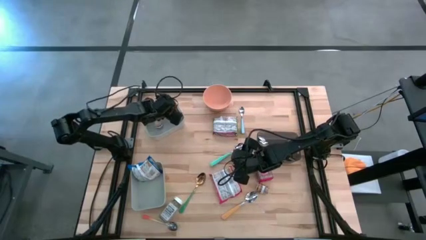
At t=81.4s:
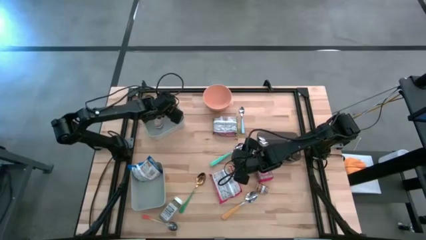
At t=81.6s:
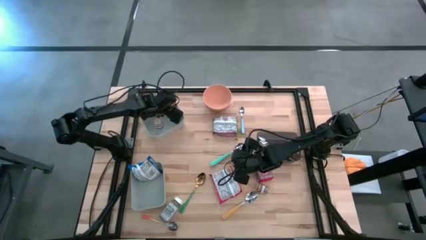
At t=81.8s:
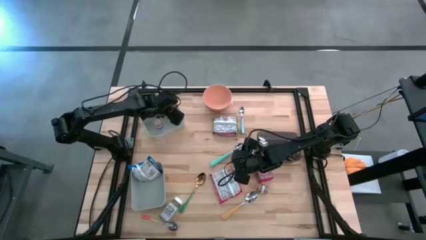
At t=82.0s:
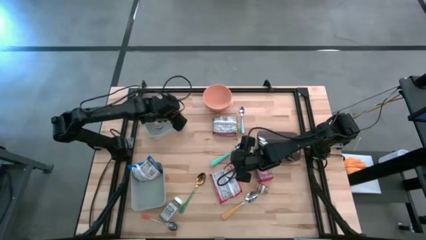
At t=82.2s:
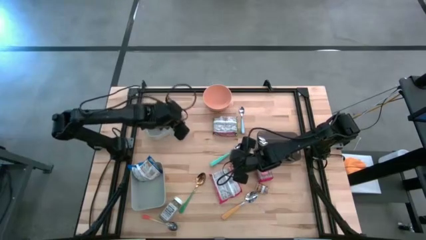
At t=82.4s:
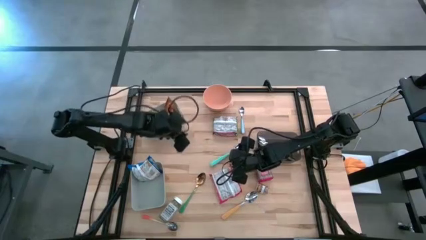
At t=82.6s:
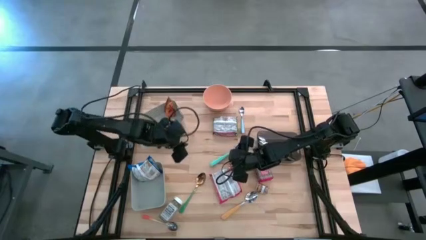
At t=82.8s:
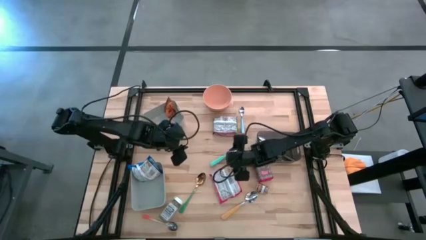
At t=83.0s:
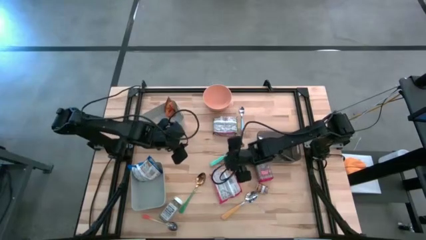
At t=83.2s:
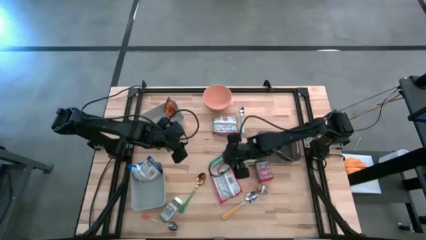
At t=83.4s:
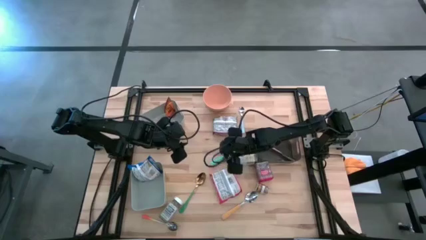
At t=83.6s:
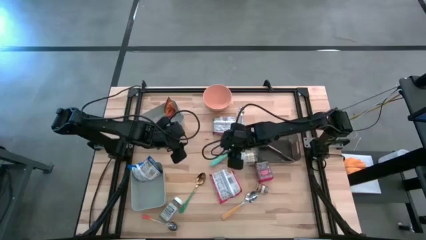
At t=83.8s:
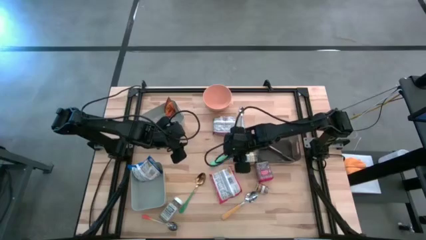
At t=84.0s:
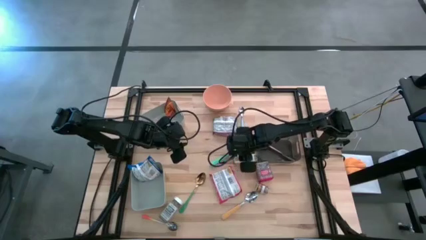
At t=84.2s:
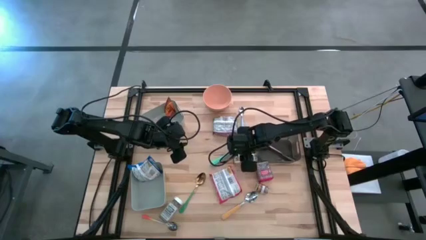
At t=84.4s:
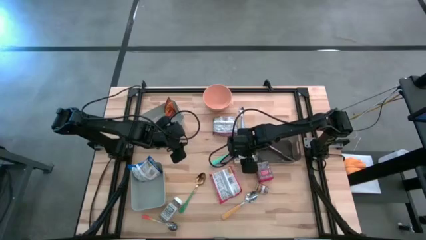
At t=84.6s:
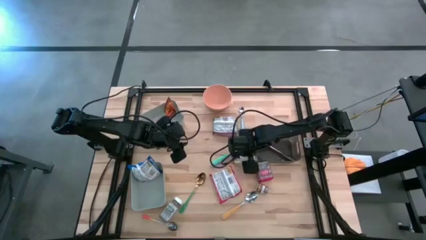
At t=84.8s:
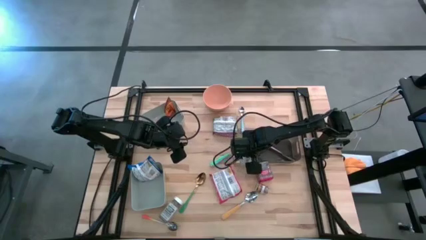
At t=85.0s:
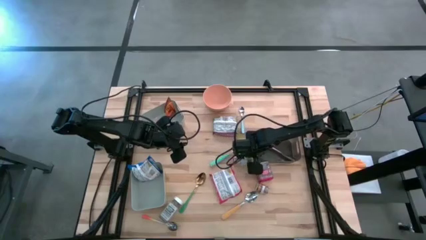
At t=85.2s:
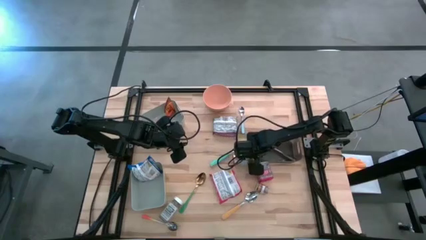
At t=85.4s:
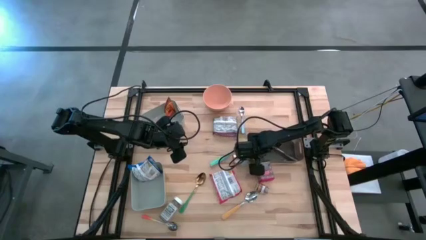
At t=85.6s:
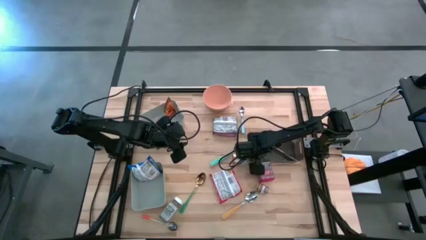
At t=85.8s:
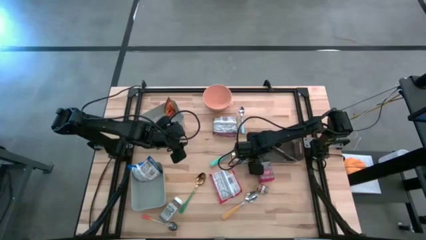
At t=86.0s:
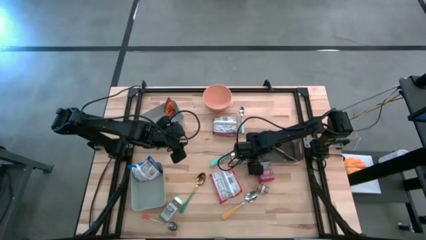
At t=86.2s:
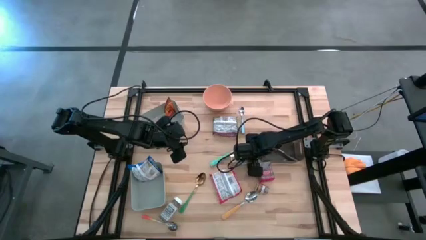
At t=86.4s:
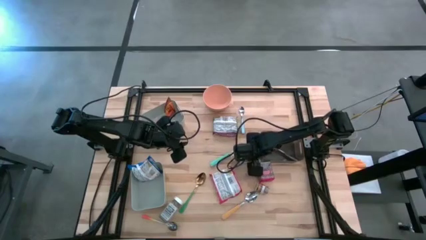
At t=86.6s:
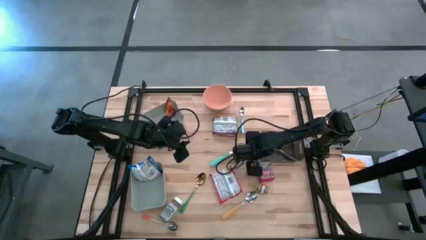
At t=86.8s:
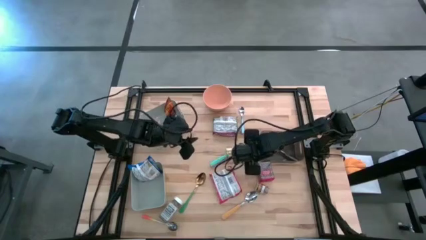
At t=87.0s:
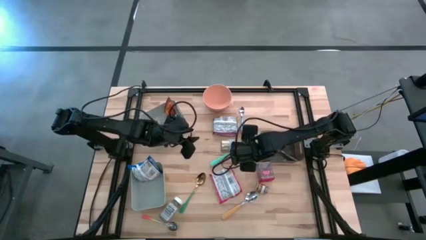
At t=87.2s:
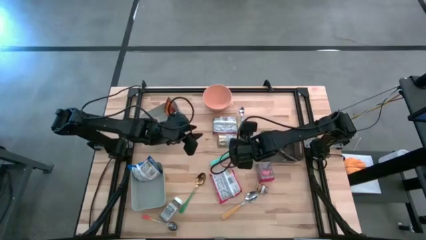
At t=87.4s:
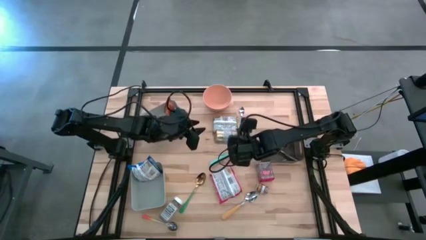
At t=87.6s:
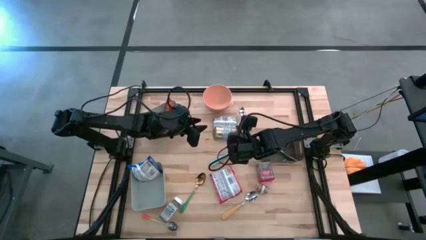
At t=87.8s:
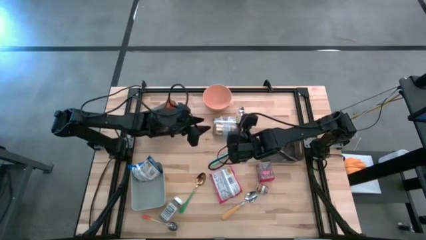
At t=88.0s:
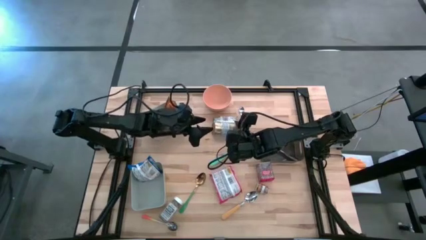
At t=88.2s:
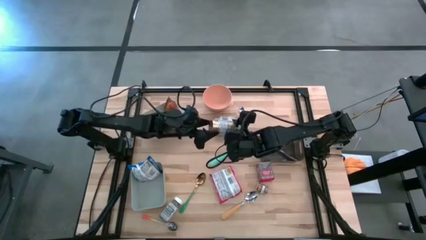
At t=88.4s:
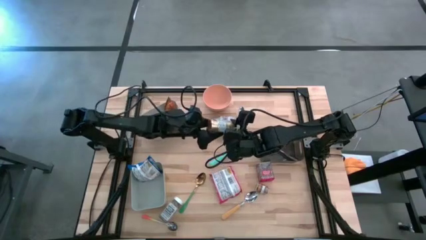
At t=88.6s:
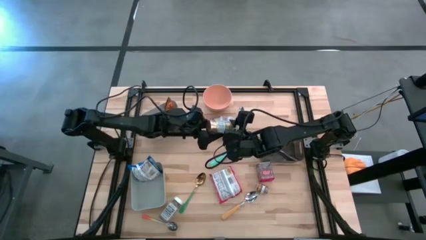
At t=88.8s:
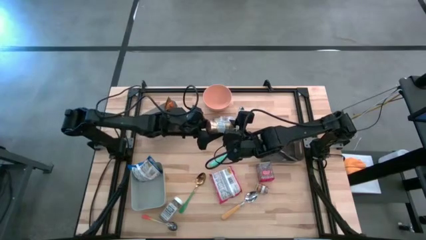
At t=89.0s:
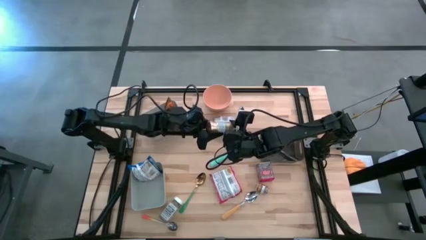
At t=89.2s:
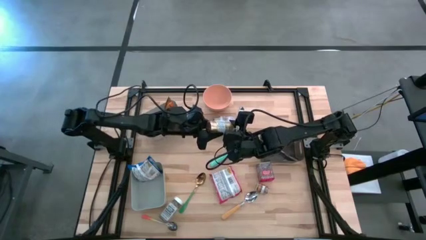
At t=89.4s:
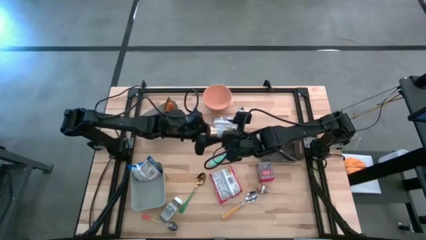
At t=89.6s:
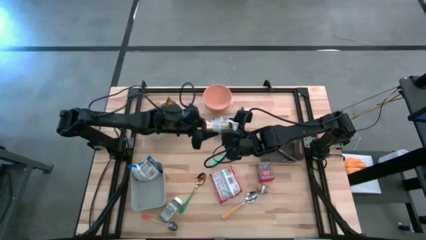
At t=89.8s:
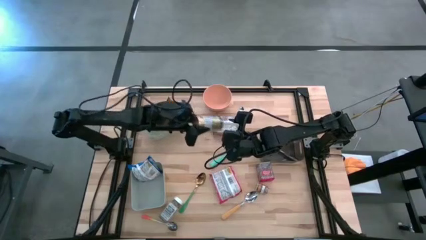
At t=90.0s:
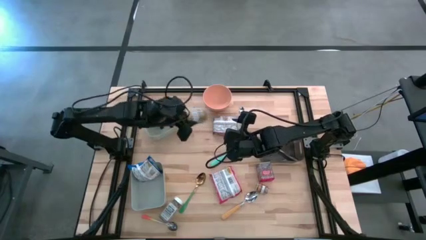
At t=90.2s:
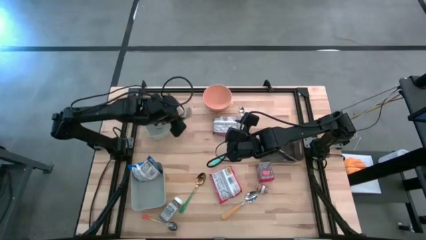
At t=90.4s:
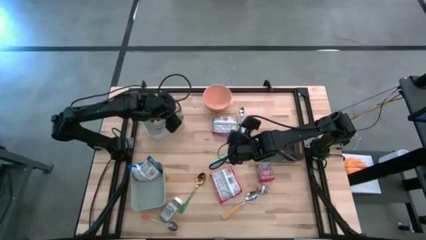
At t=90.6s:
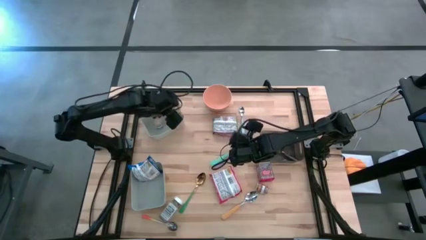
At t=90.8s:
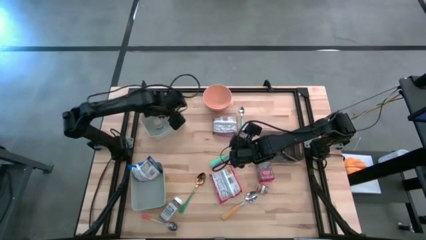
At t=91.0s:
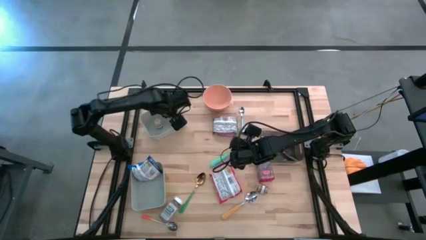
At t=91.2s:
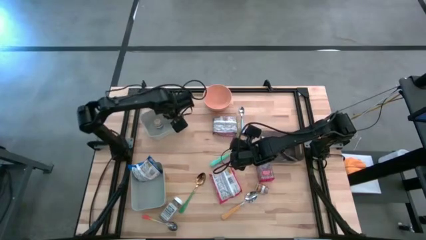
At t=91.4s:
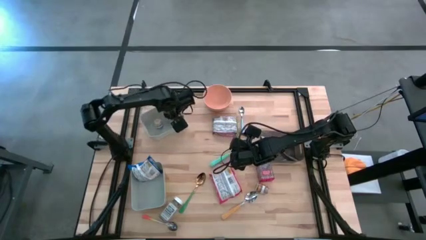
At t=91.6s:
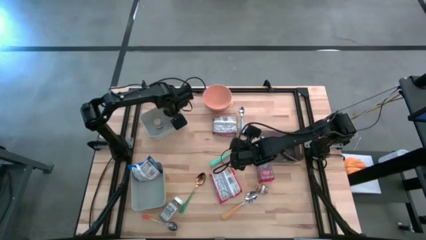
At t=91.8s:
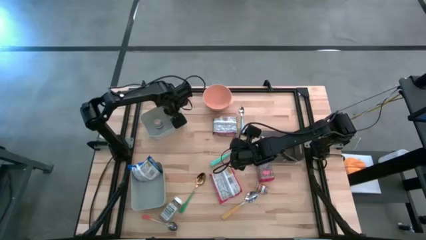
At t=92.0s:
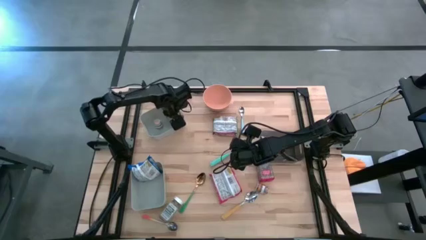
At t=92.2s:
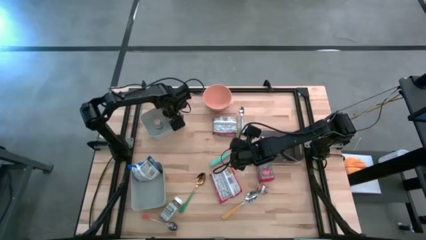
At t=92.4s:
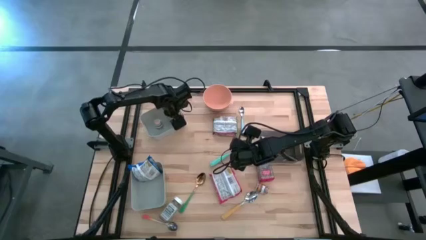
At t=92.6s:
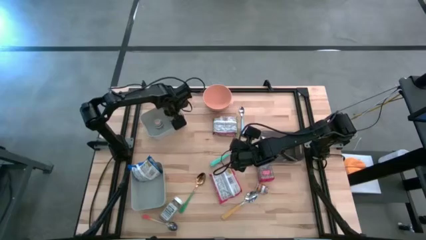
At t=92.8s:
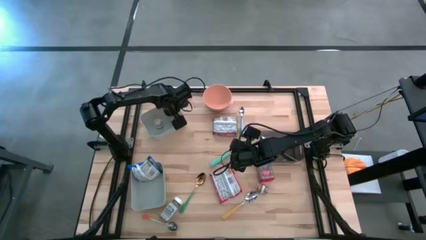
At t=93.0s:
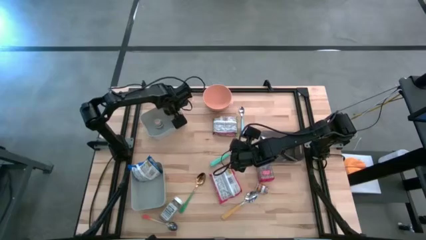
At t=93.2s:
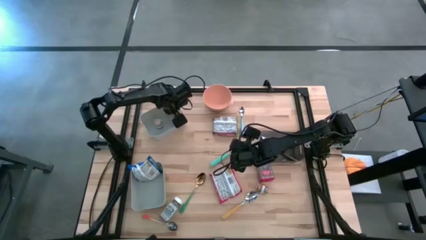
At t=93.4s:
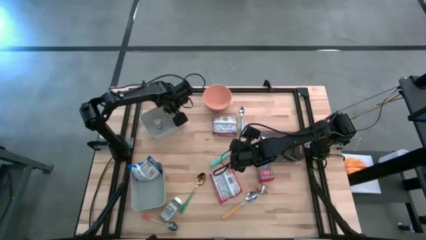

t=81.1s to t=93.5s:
Put the gold seasoning bottle into the top gray bin

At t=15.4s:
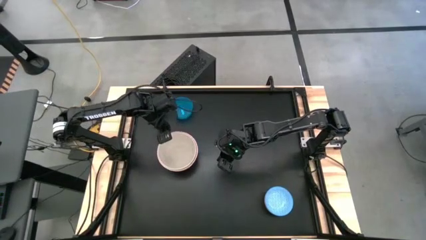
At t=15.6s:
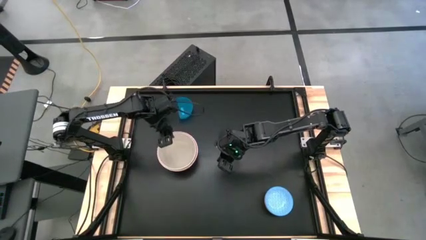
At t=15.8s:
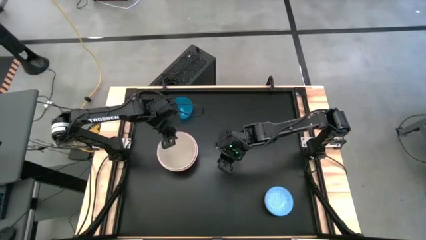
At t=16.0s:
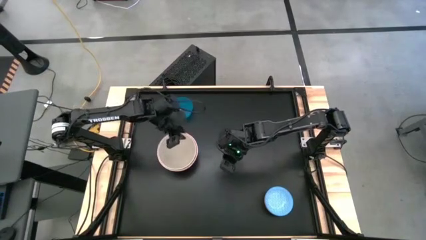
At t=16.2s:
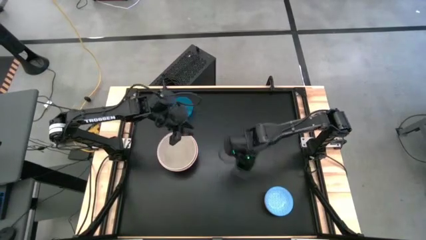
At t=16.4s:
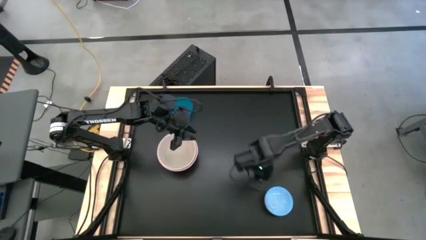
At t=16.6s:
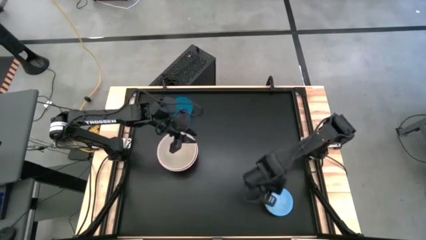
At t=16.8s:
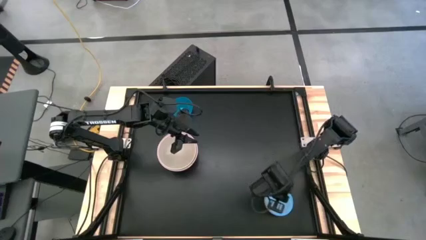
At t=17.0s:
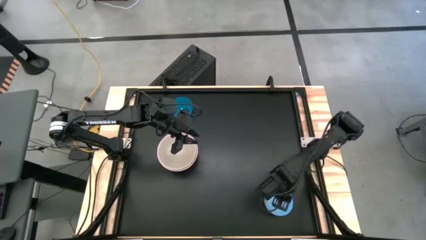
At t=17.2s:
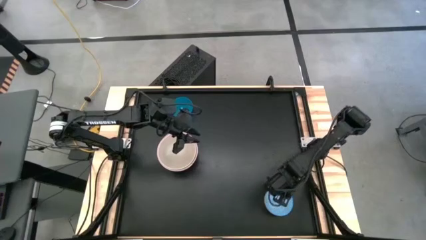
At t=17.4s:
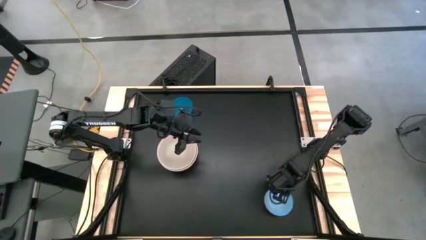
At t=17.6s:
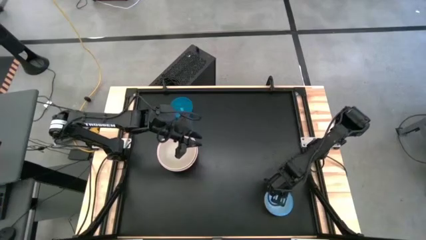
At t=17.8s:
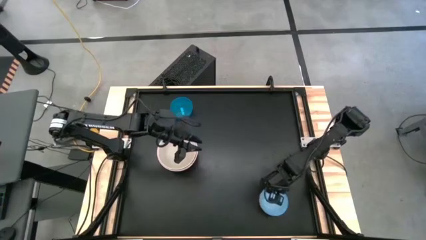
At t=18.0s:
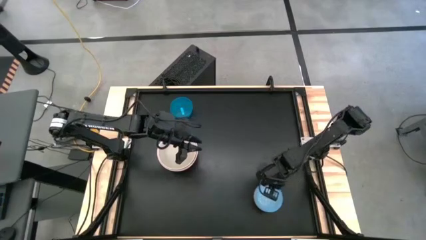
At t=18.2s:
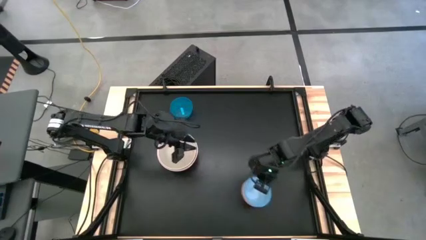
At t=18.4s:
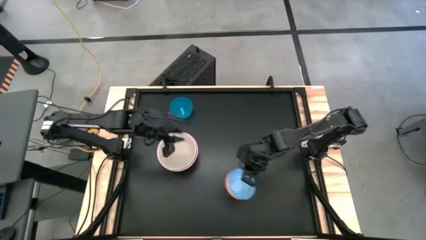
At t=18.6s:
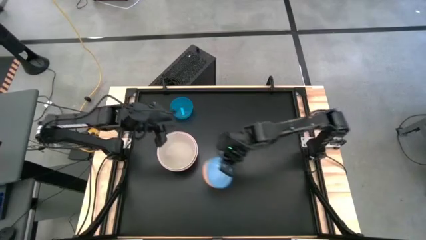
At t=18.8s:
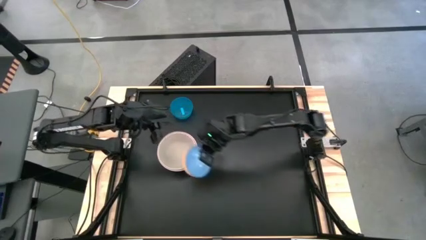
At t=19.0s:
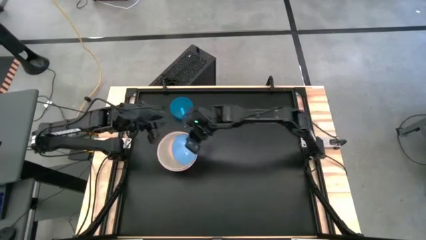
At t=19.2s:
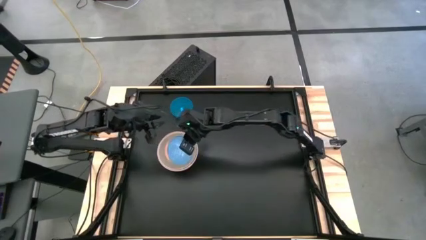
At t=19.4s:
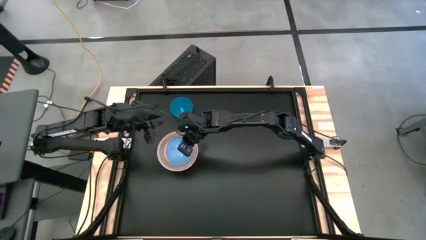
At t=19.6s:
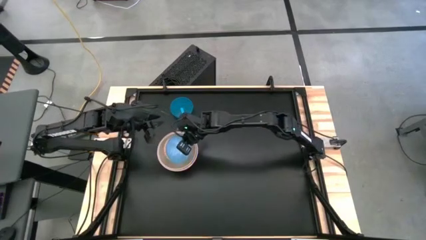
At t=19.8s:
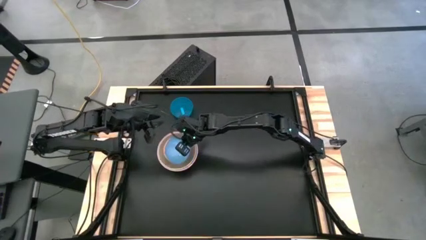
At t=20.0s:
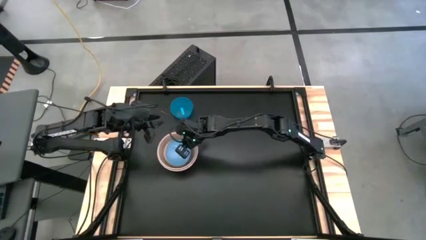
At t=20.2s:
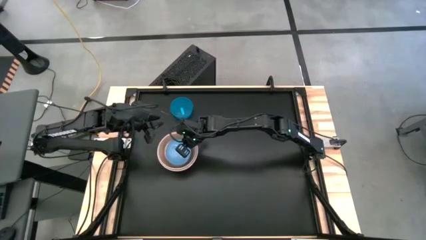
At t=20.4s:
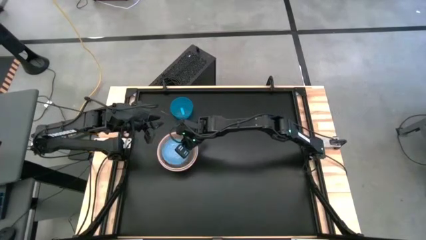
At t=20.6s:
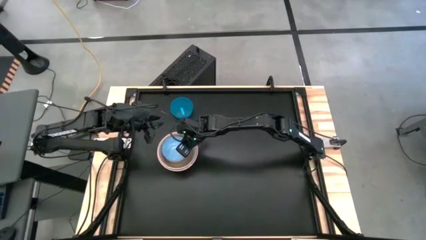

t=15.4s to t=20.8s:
Stack the blue bowl on top of the gray bowl
